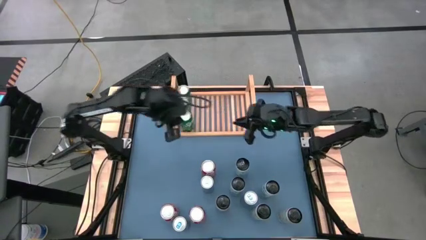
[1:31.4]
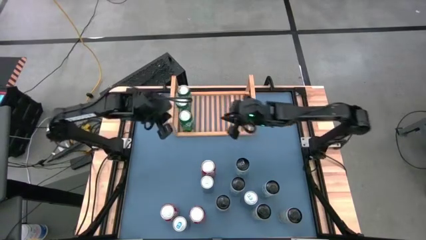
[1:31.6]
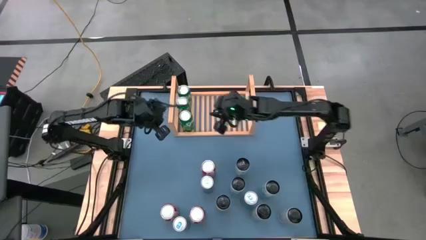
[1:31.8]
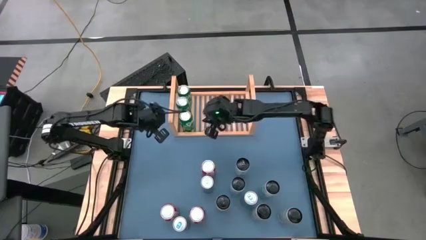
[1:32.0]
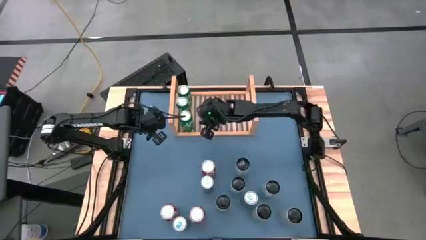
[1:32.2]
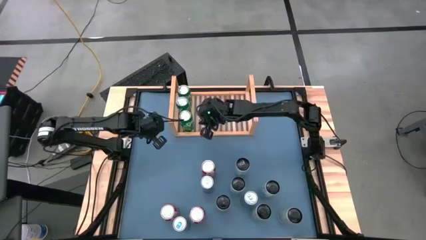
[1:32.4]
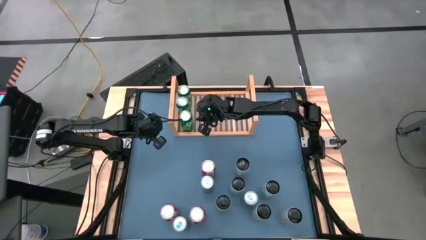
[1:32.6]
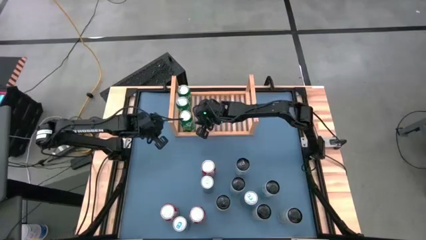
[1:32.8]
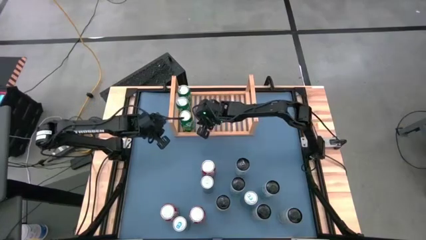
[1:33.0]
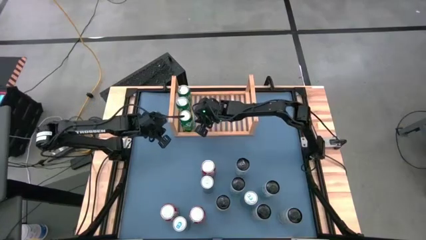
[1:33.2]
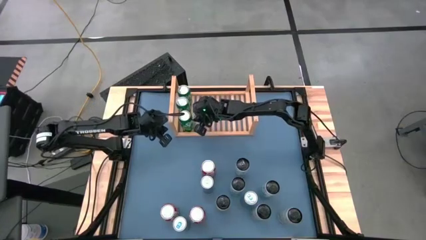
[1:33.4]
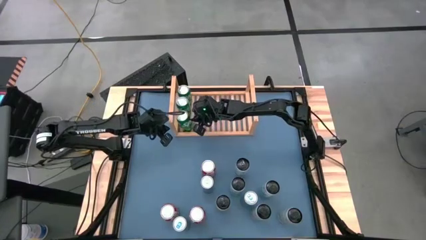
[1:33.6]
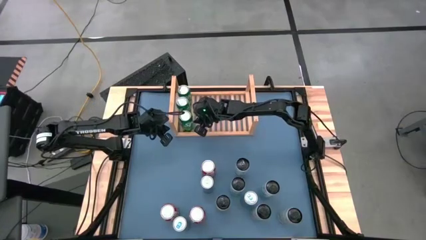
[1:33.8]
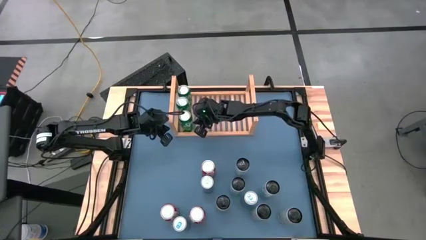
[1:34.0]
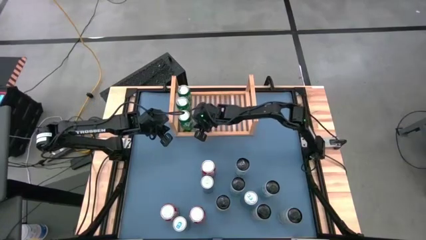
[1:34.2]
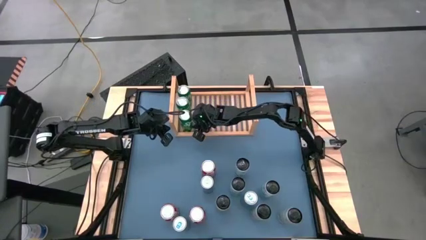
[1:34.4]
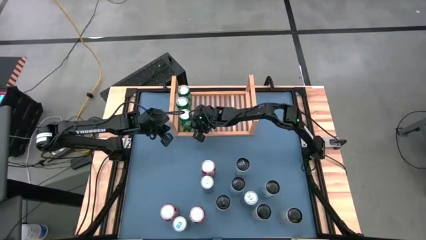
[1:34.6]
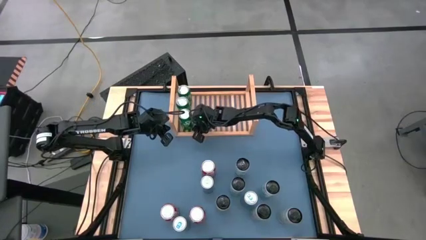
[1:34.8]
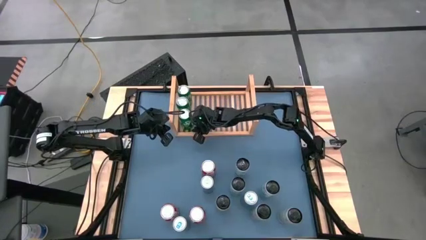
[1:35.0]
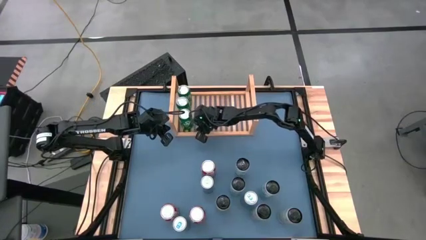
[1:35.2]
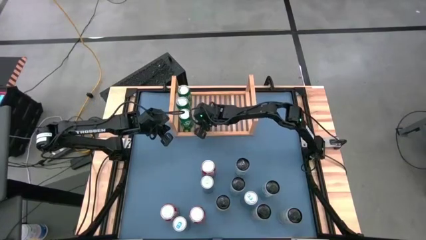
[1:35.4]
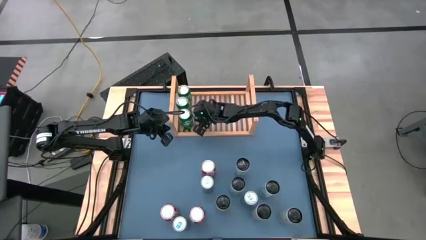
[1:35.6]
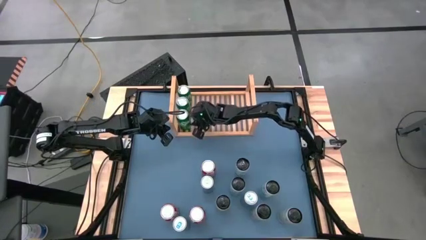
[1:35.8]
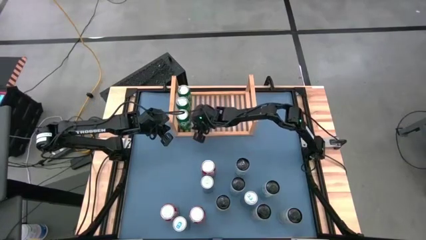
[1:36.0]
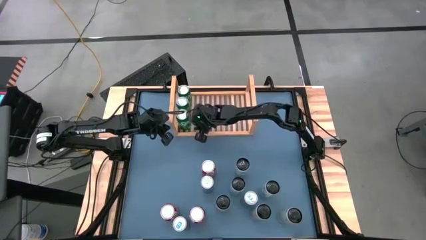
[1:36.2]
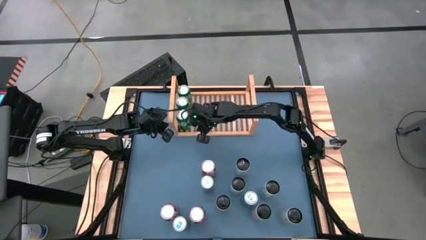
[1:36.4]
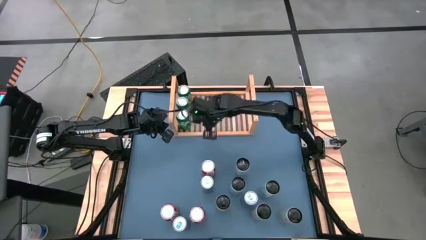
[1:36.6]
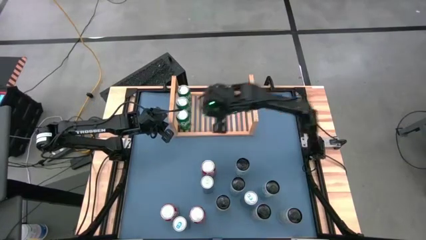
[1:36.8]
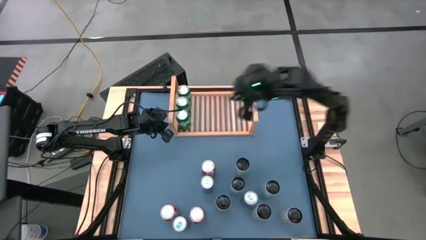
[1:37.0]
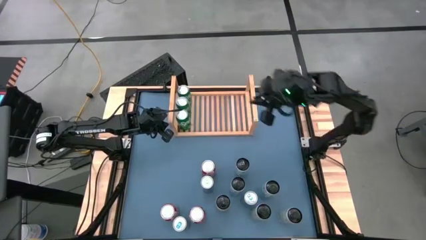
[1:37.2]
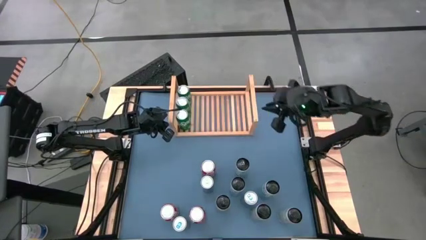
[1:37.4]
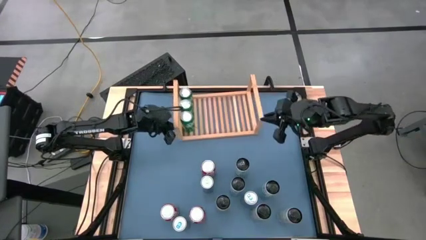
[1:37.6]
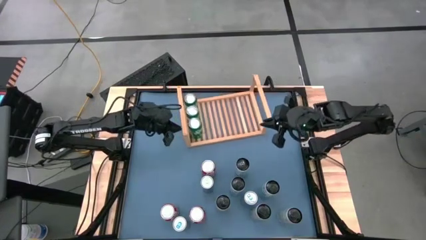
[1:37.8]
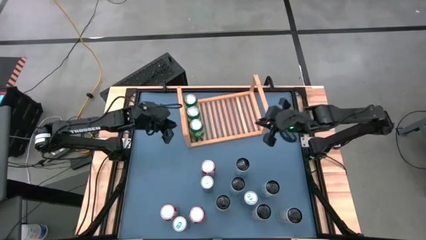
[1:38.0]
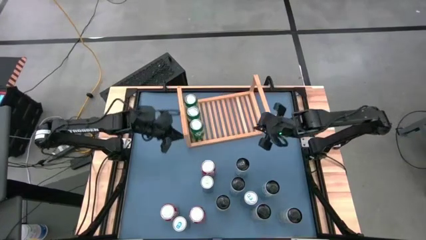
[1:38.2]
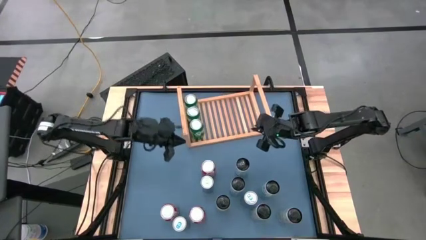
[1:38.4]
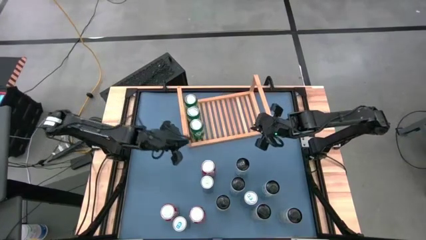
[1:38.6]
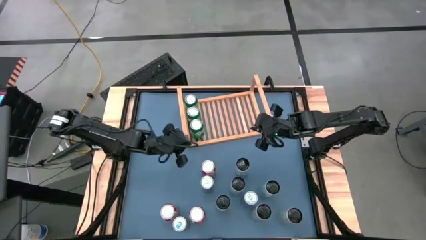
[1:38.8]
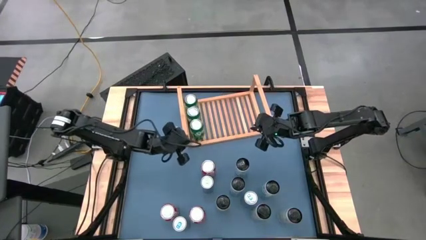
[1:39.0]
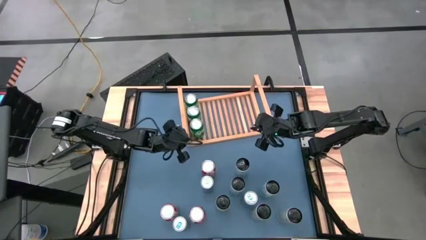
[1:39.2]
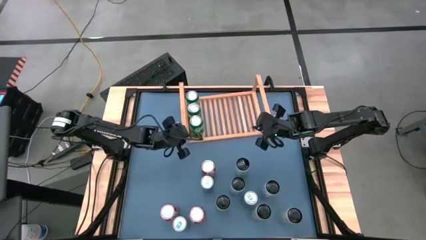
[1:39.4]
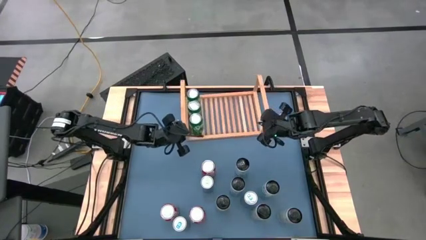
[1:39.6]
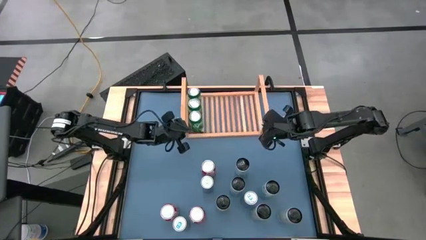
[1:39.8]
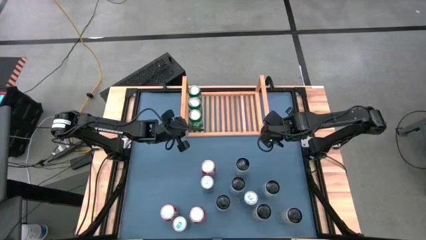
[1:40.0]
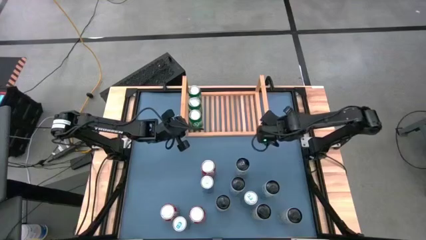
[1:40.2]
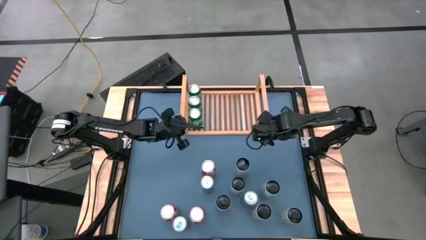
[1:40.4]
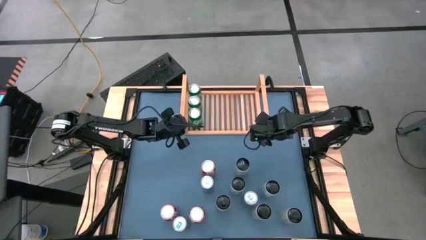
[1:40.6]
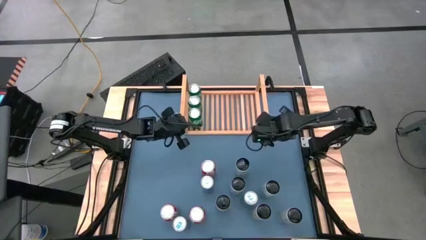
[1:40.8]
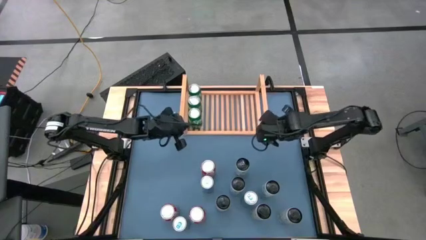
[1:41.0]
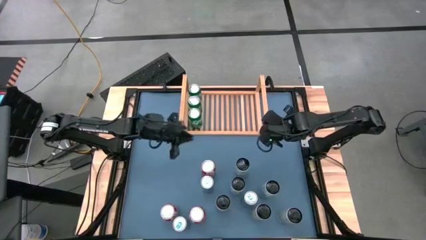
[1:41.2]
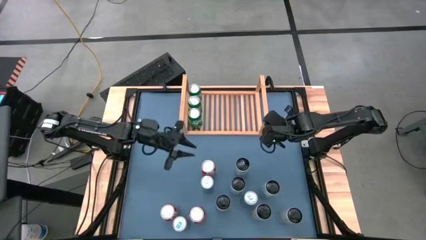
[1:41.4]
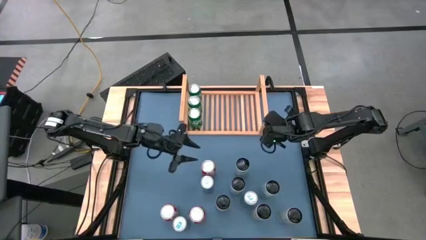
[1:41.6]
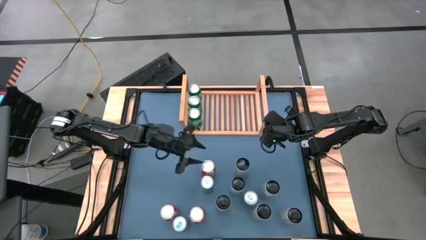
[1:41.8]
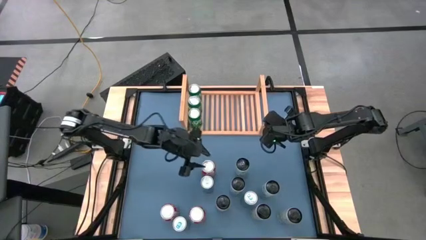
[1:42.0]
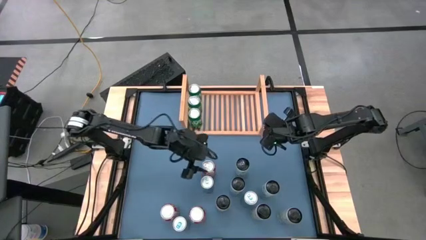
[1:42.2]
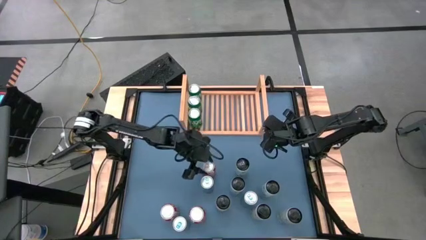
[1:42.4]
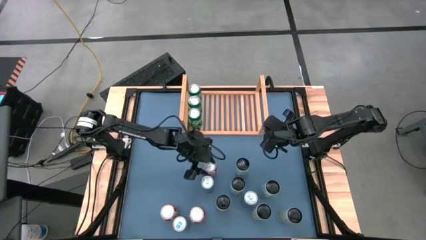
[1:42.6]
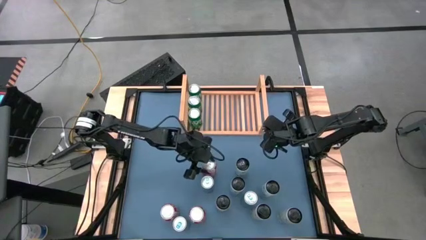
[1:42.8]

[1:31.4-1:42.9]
Task: Place canned beverage on shelf
Adjust the shelf

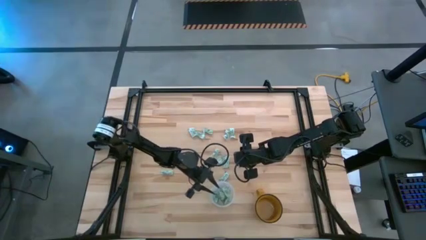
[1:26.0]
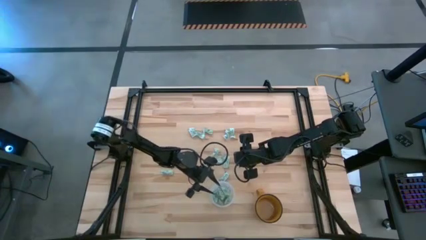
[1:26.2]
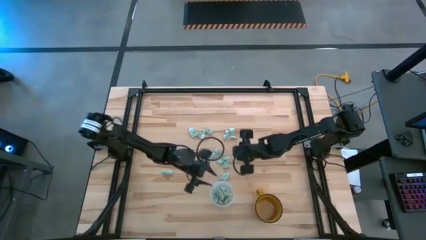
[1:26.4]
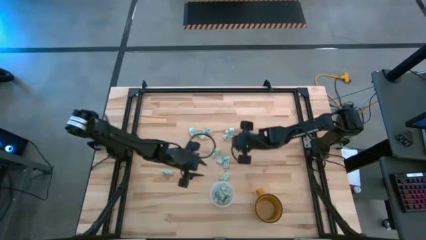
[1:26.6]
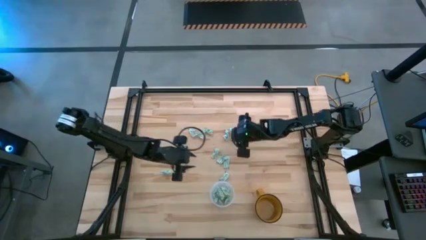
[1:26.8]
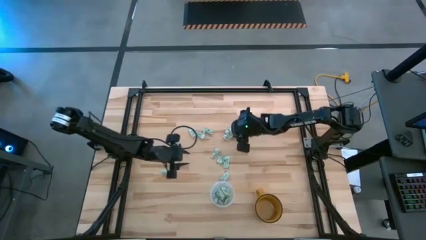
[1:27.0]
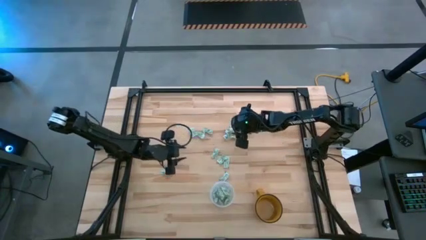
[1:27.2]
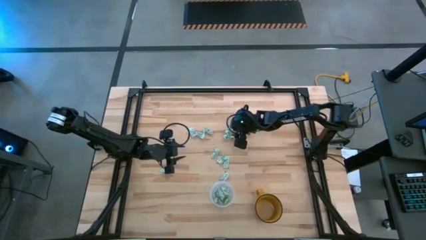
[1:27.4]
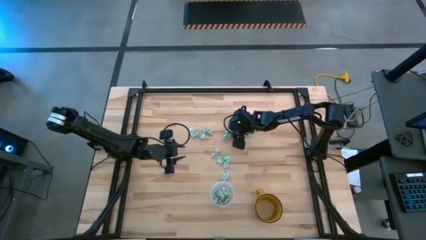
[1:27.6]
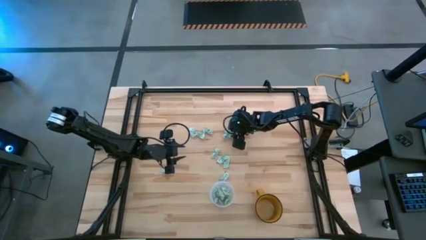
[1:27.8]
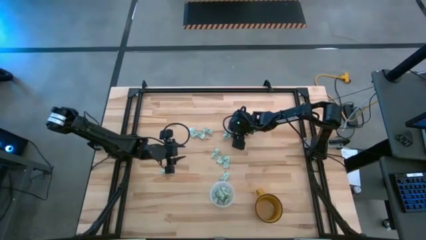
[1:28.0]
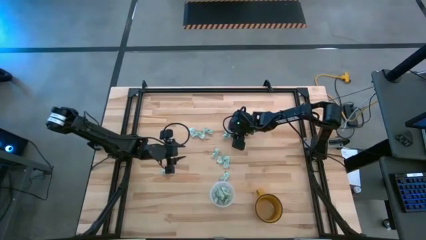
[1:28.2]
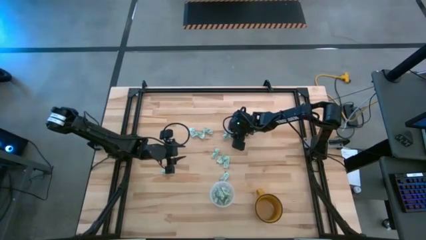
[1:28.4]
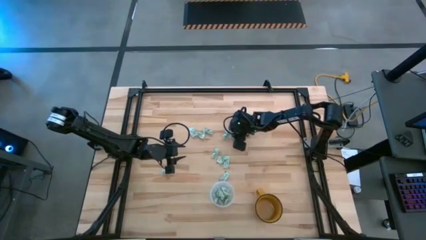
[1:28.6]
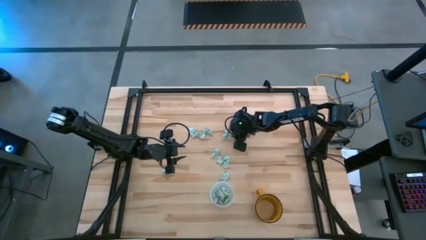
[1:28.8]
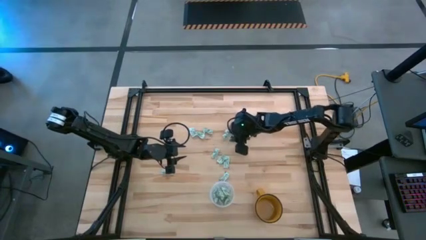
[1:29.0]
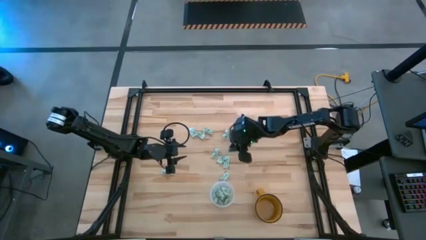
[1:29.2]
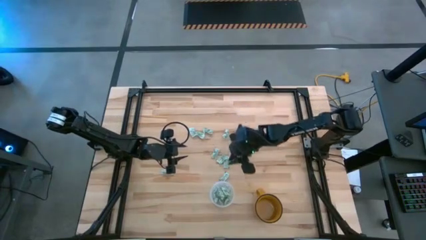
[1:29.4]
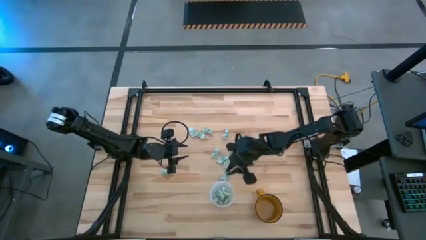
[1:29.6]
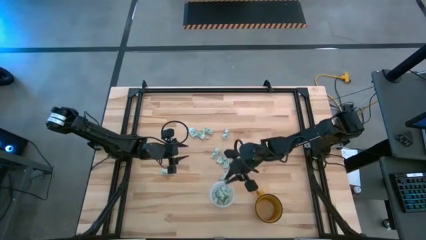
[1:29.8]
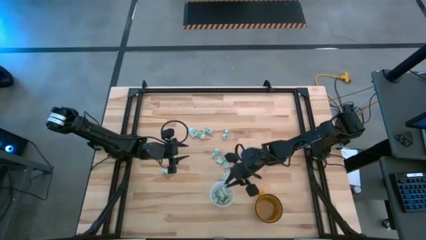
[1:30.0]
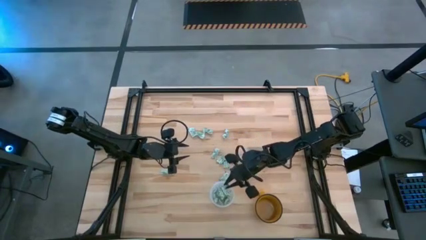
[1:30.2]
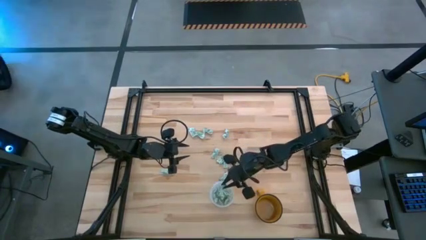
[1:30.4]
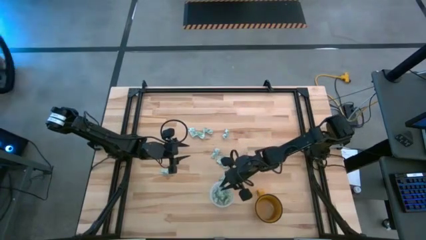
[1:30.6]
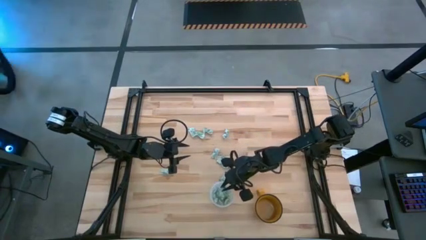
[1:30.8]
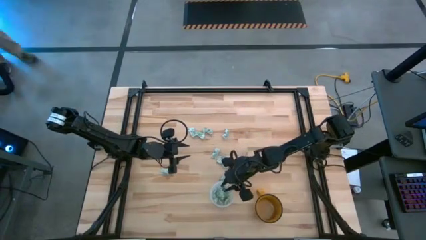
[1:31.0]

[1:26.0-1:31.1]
Task: Pick and place Stevia / Truvia into bins
Put the stevia packet into the transparent bin

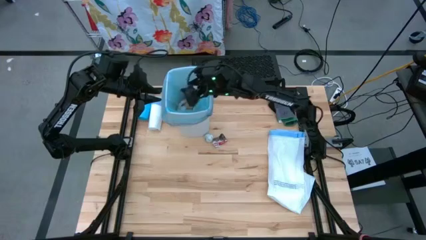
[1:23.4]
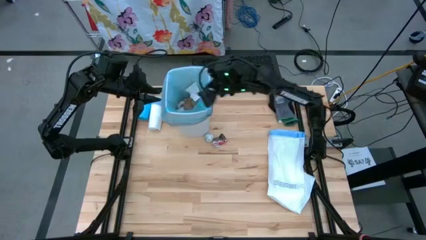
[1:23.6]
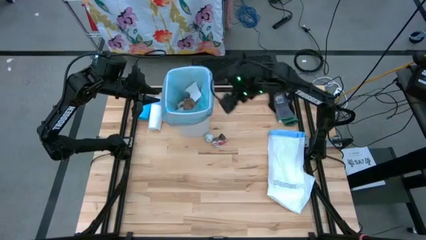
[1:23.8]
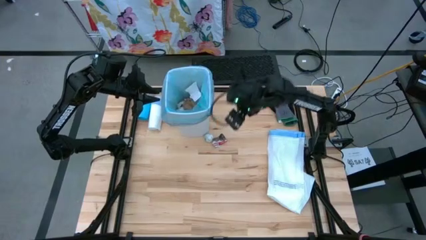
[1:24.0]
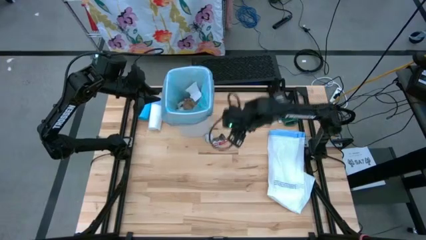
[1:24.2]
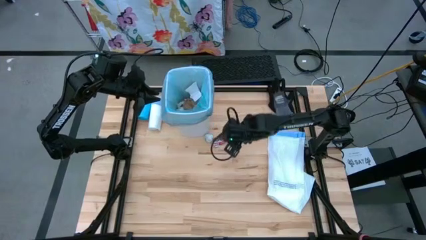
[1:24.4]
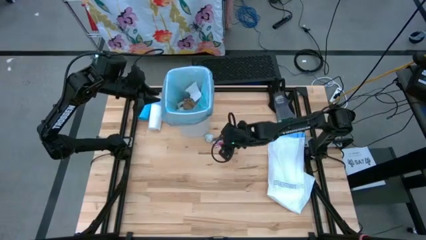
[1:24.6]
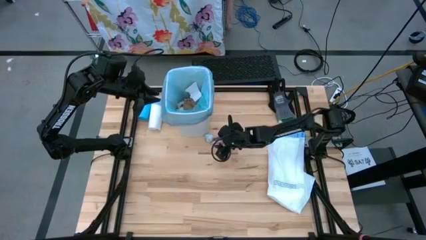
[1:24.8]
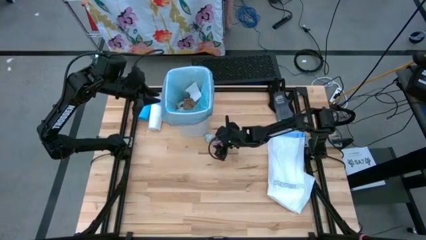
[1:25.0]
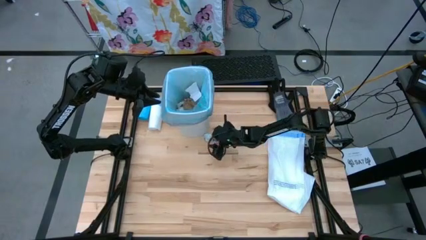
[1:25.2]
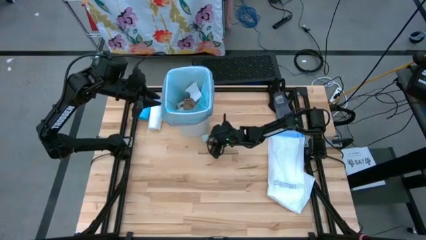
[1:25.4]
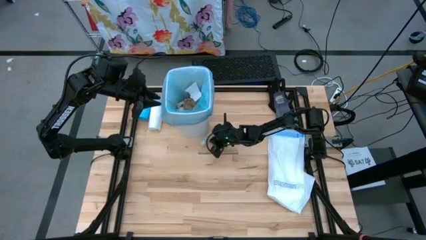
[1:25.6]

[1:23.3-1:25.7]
Task: place trash/remove bag and relplace
Put the blue trash bag into the white trash bin
